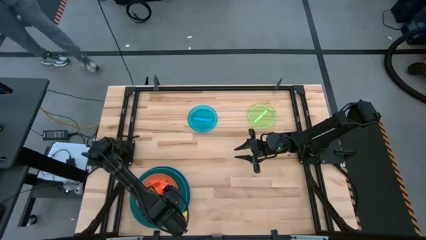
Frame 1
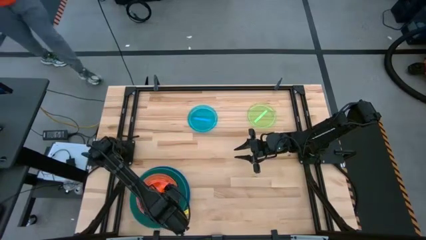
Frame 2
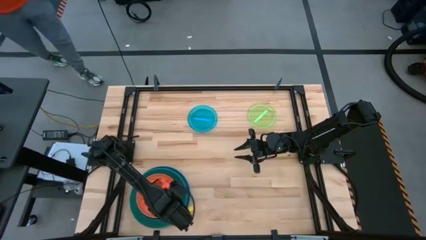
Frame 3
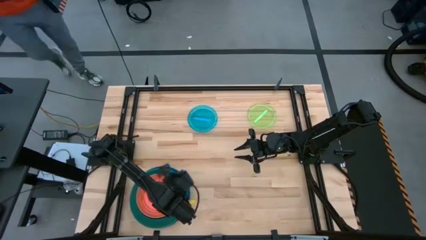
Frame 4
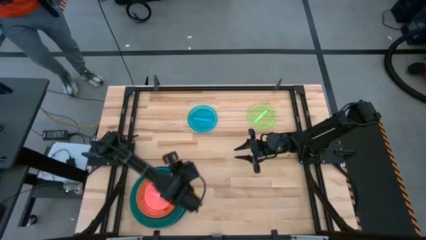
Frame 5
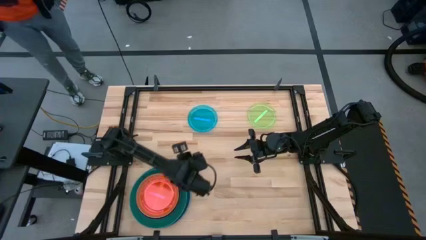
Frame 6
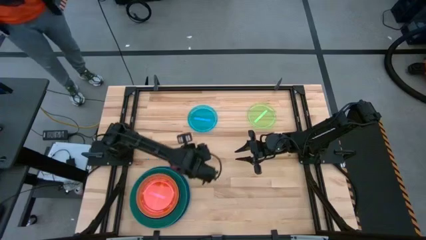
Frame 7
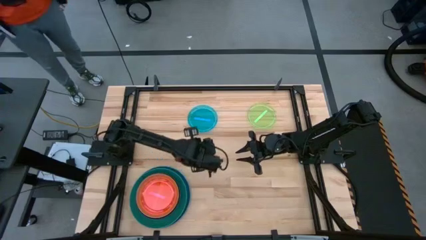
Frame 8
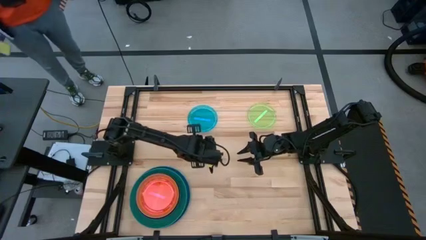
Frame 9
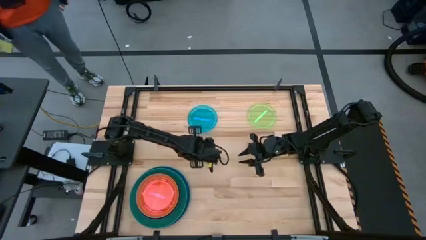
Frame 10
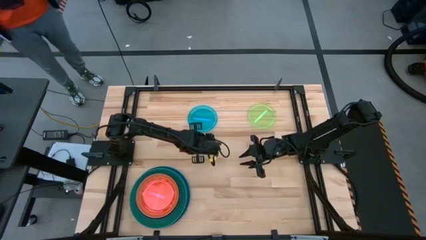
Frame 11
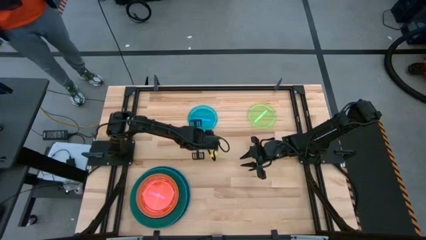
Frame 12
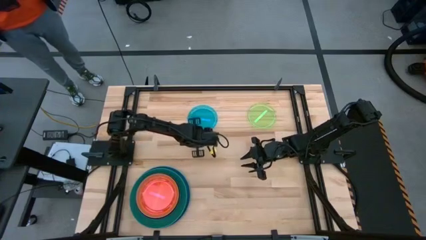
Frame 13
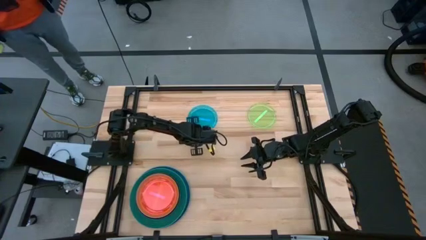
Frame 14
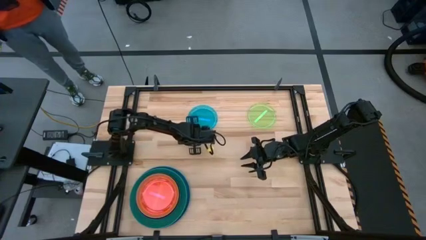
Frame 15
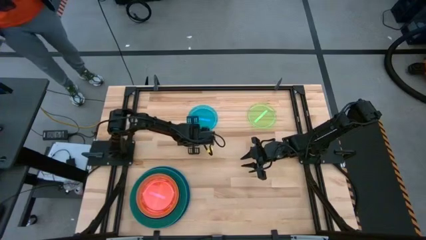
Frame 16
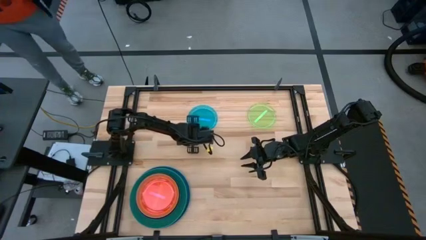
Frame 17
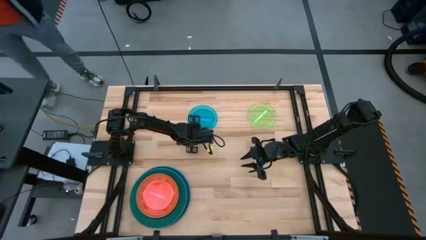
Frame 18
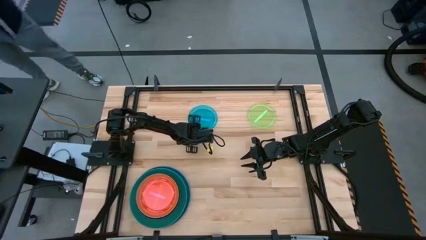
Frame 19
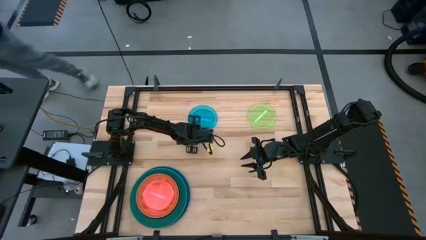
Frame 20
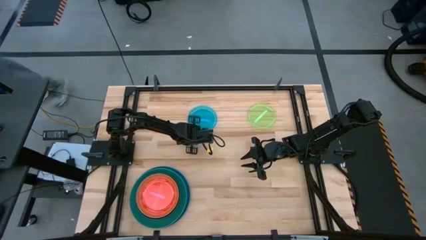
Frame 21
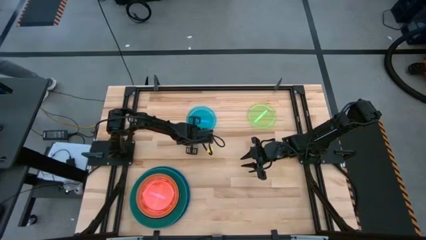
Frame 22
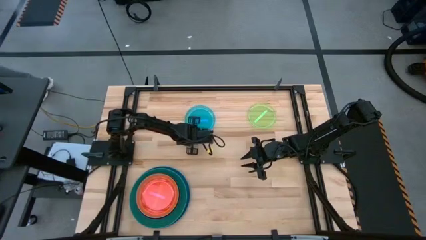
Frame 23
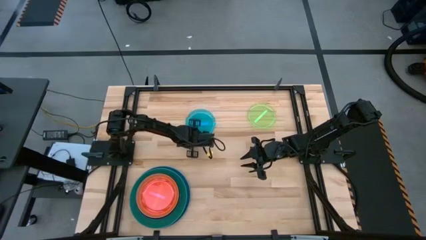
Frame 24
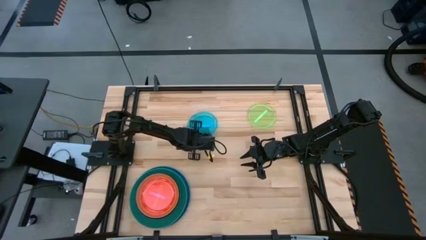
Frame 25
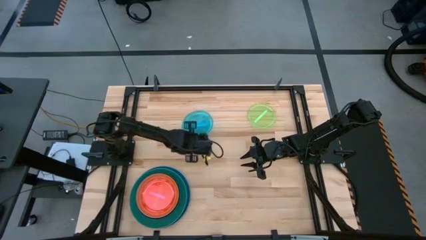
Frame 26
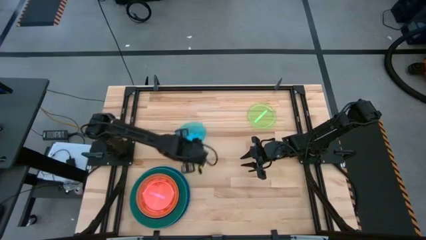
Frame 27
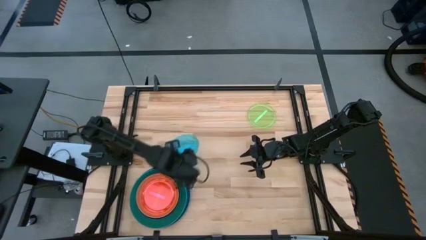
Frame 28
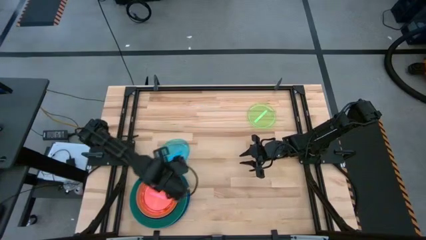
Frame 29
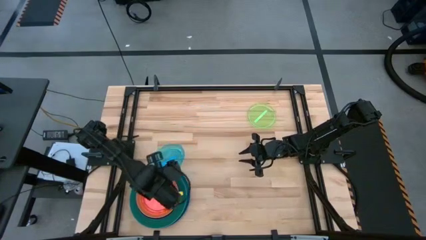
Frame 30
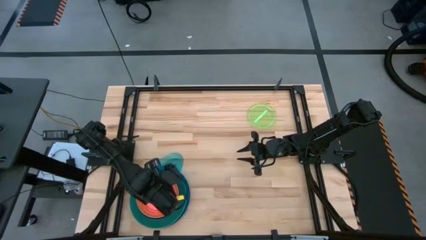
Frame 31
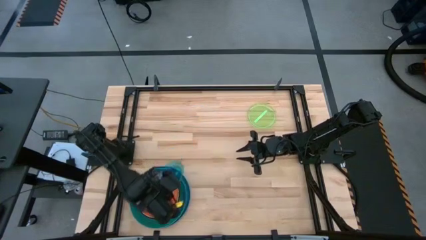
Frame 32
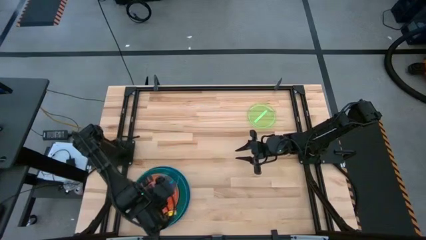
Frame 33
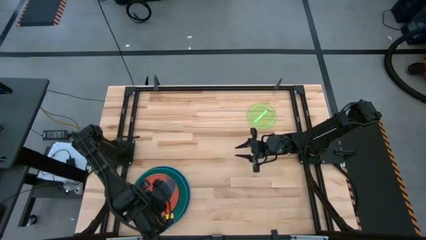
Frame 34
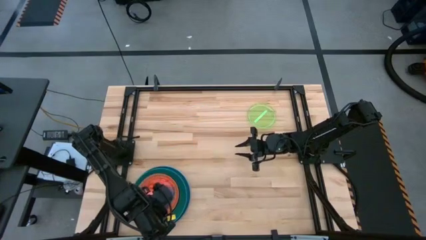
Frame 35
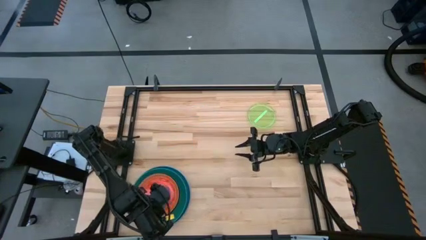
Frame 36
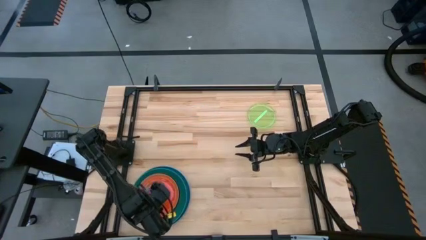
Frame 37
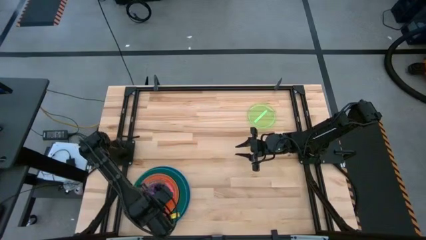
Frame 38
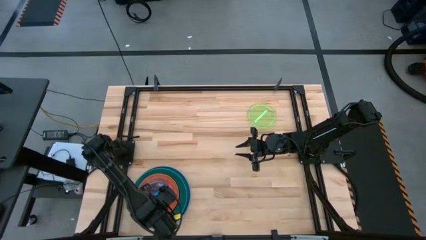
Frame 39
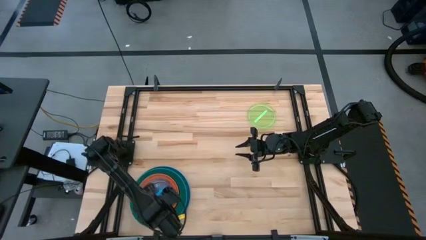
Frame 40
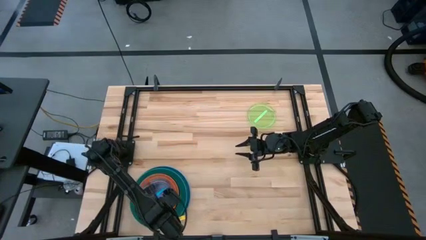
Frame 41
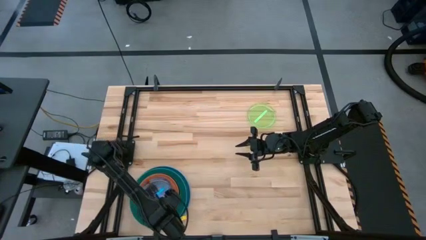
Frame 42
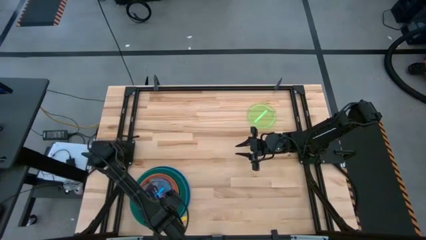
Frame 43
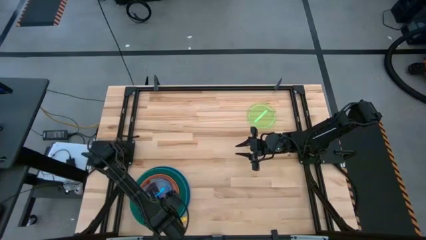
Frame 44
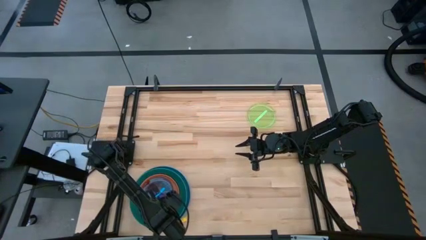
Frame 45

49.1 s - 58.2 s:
Task: Stack plastic plates
Stack the blue plate on top of the pink plate

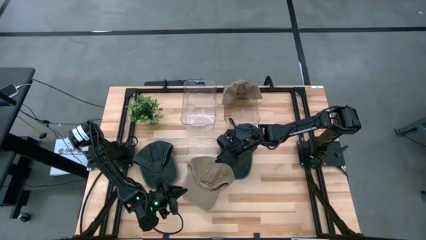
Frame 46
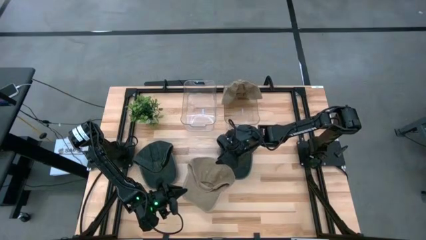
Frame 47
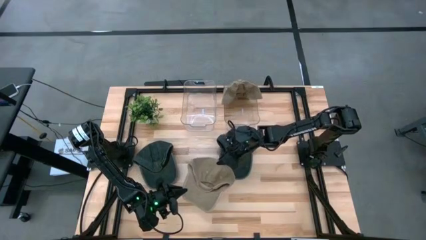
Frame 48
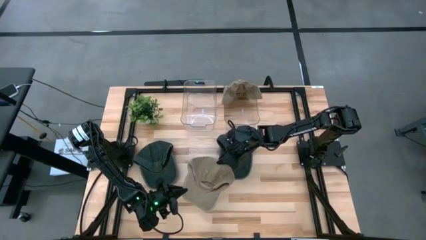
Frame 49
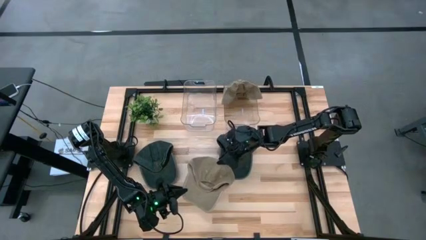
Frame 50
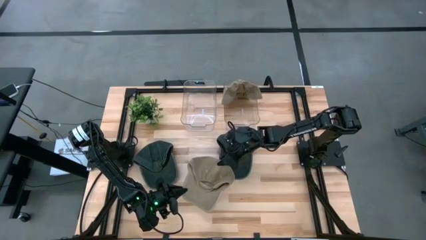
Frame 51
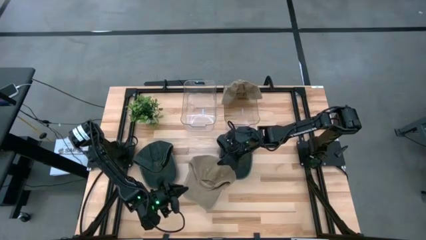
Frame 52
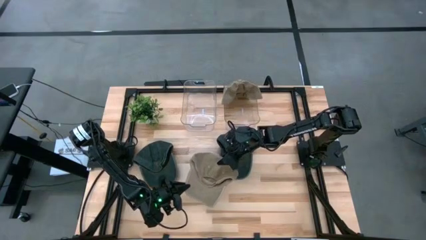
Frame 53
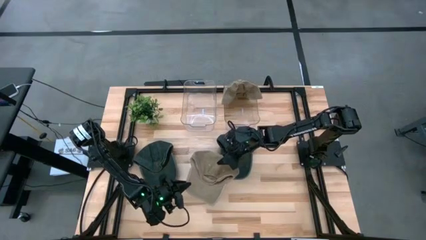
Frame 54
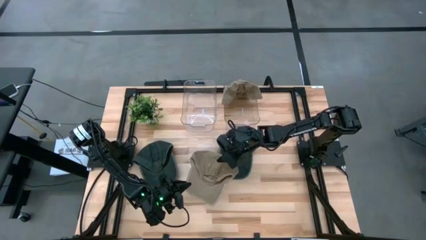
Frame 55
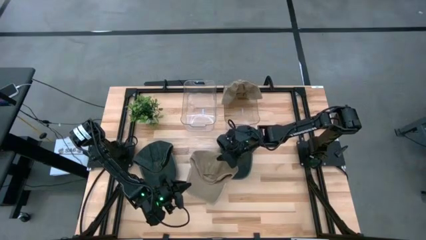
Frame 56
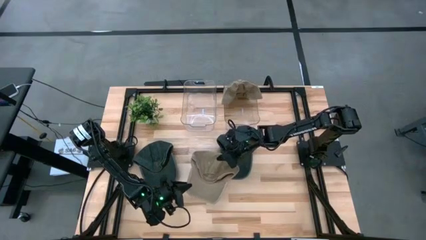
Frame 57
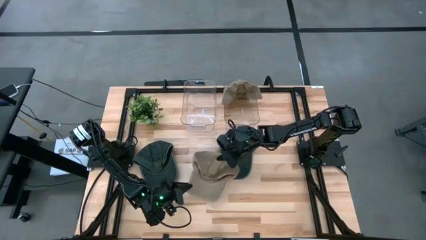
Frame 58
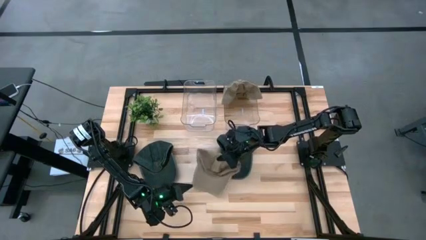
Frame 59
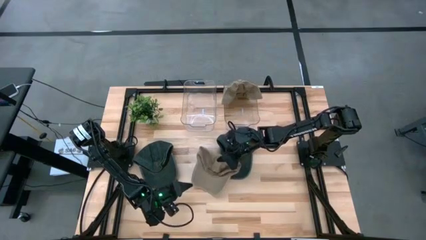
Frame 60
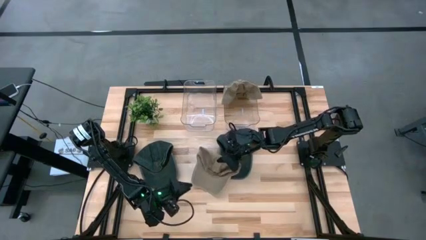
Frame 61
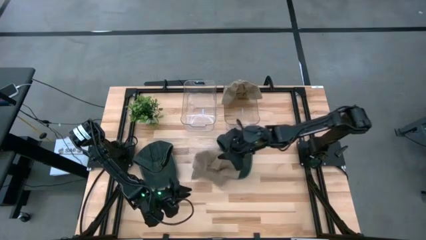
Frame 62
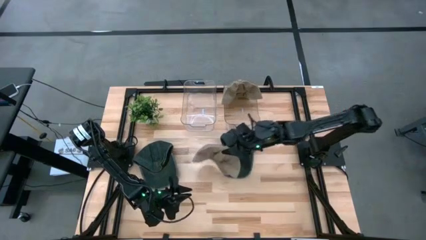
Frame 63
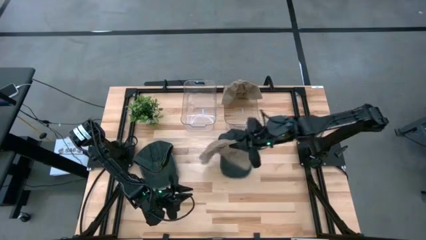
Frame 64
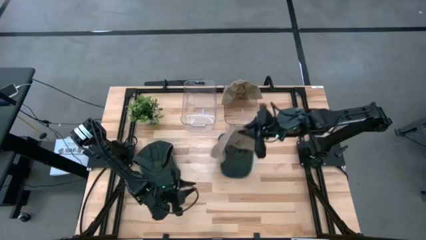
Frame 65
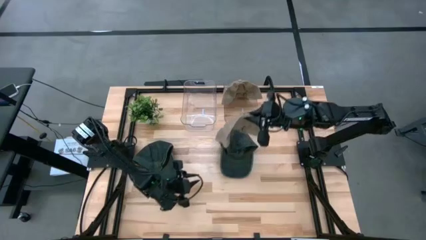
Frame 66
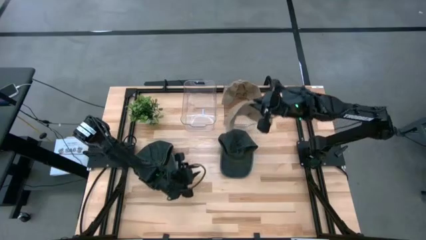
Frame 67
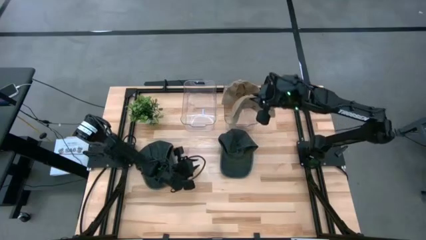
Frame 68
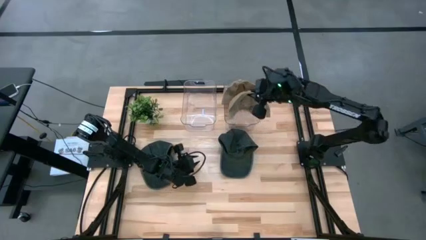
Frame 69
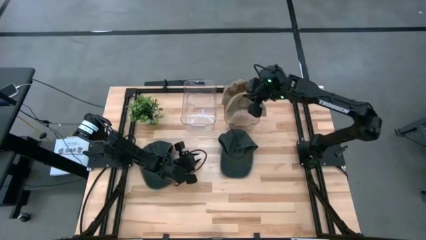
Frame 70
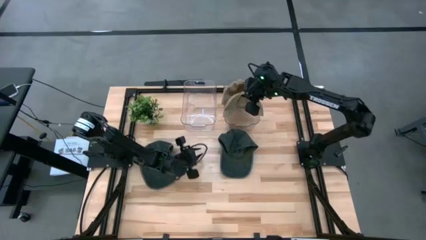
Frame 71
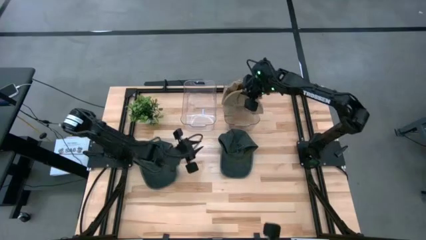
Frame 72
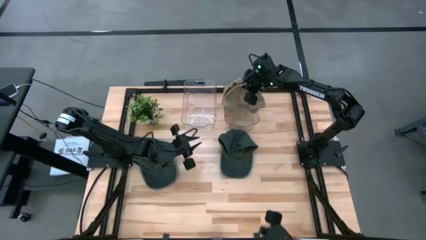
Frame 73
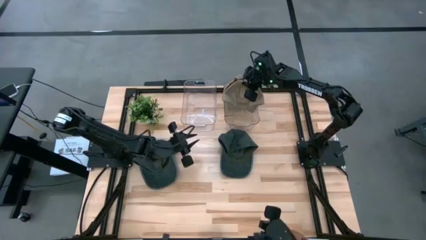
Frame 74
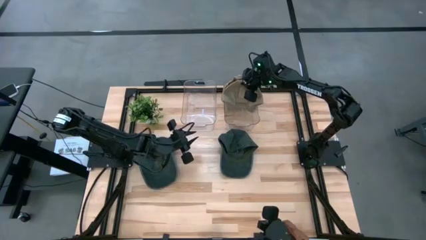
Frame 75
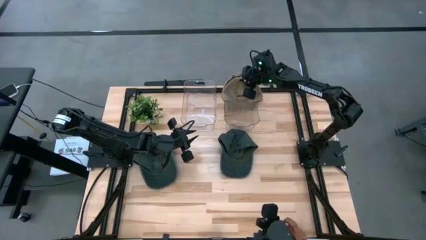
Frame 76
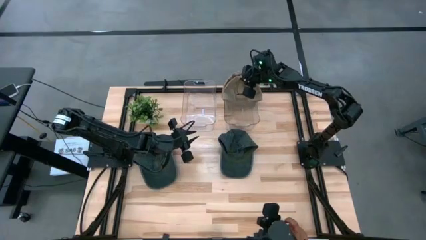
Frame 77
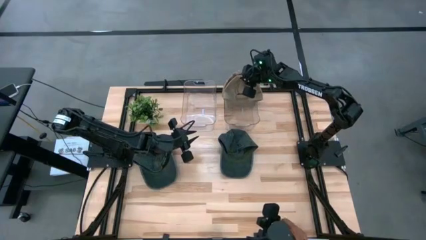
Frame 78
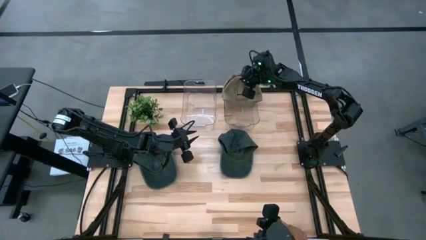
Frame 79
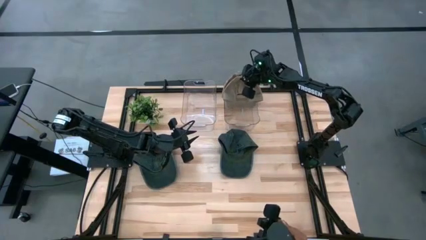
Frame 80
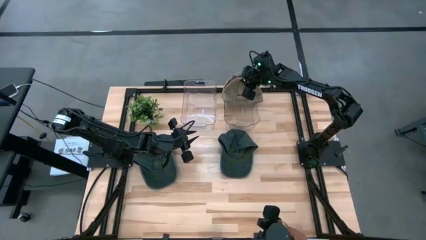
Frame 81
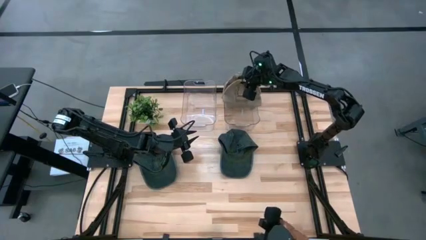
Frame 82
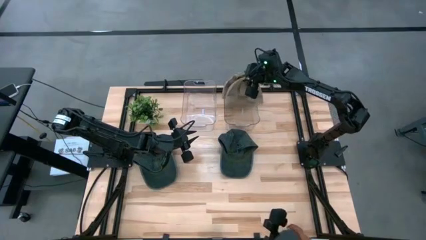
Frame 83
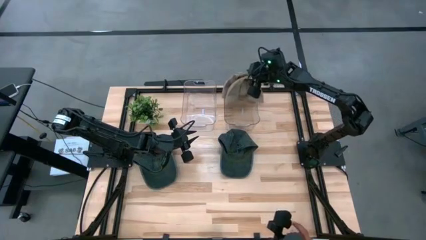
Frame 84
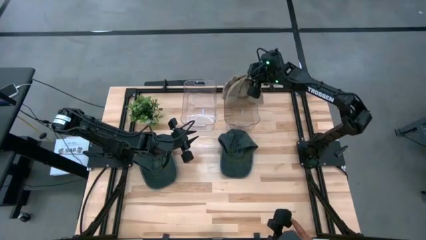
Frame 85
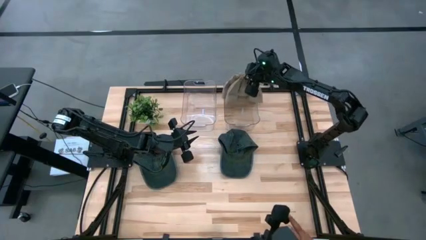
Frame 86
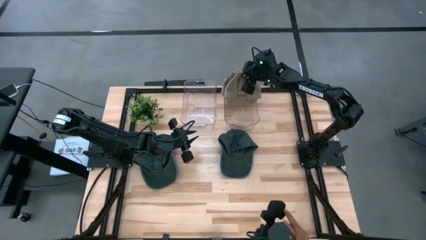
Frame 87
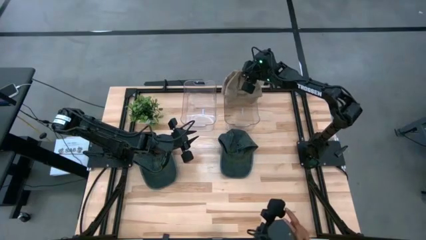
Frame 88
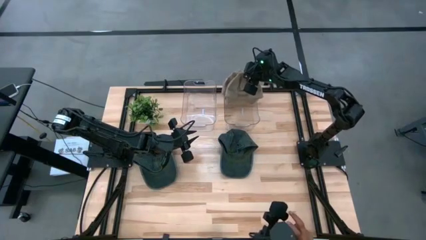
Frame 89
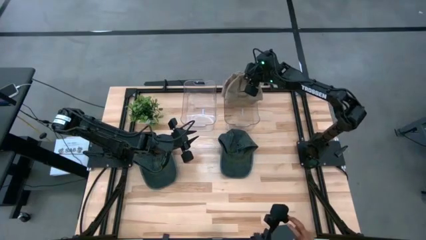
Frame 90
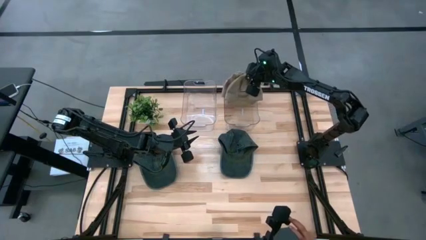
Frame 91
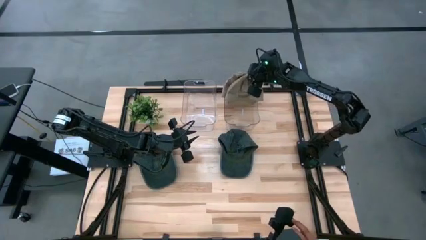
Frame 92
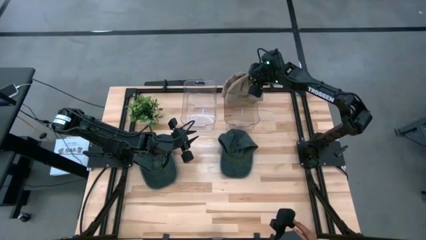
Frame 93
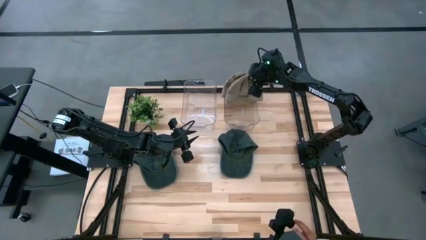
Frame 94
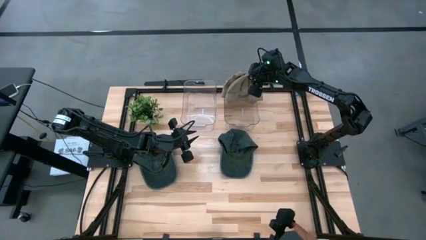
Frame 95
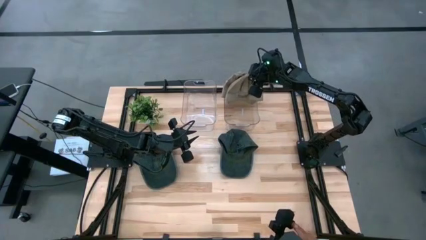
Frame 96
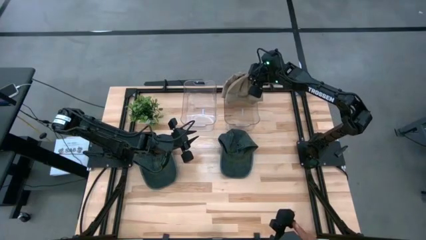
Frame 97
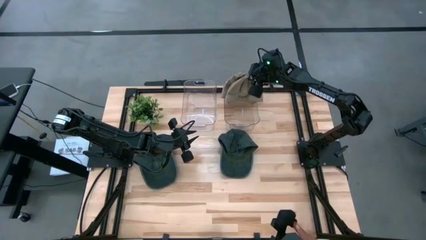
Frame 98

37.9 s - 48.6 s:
Task: Pick & Place hat
Put the brown cap into the right transparent bin
